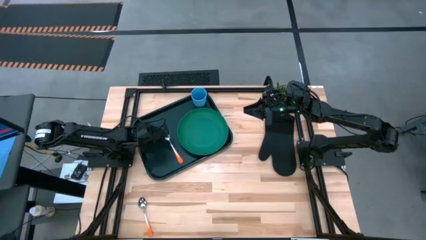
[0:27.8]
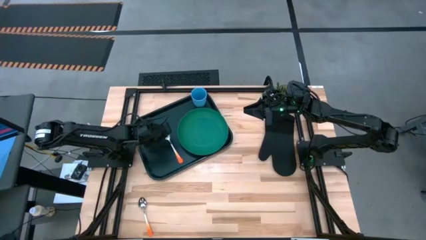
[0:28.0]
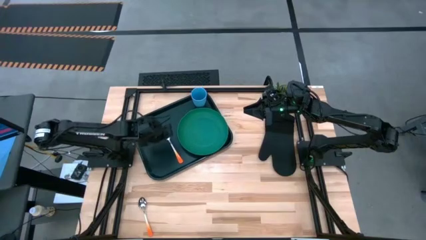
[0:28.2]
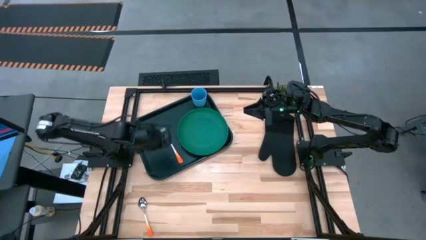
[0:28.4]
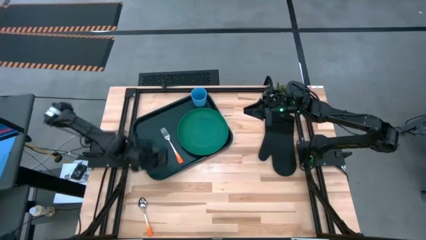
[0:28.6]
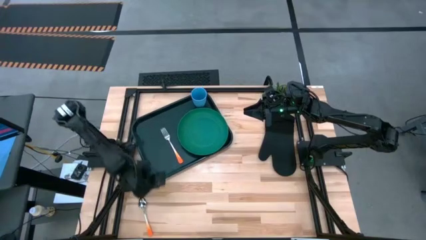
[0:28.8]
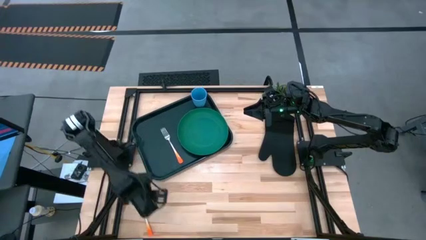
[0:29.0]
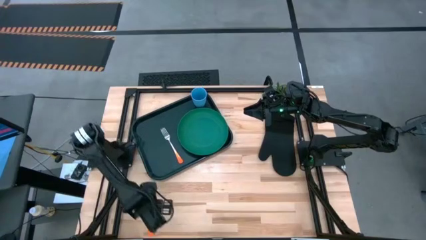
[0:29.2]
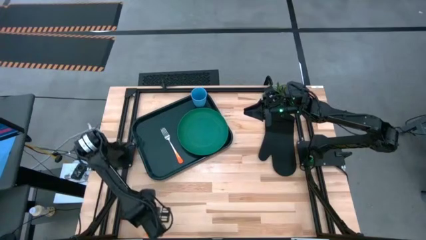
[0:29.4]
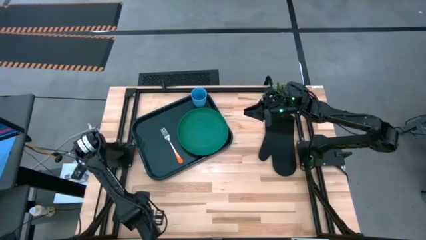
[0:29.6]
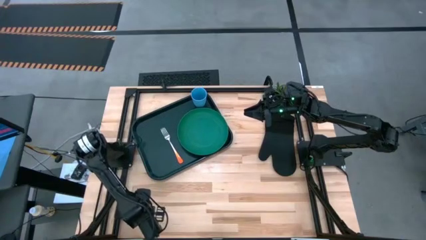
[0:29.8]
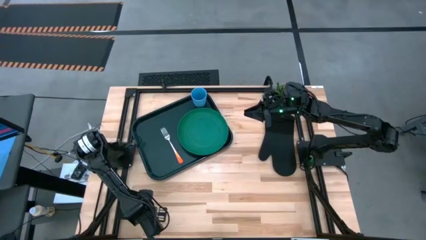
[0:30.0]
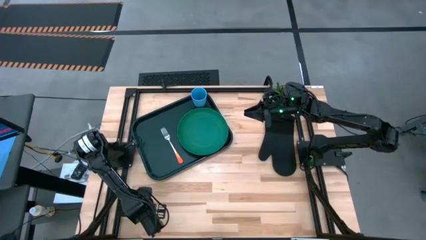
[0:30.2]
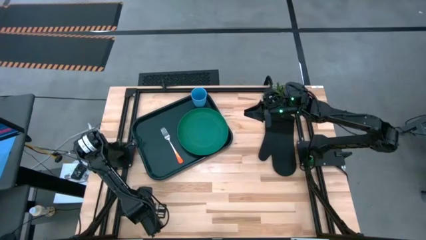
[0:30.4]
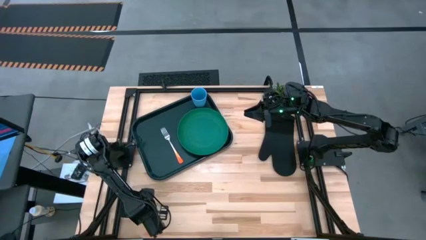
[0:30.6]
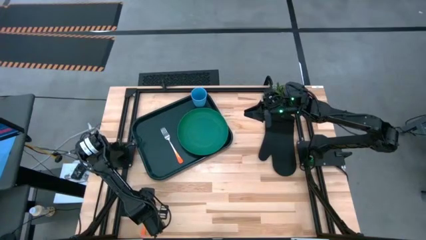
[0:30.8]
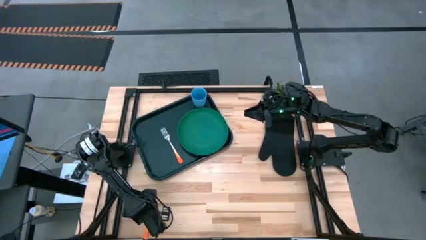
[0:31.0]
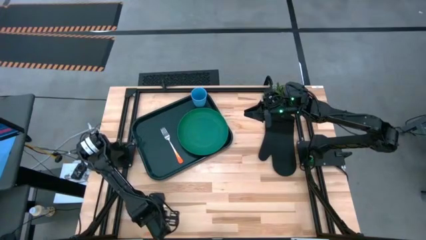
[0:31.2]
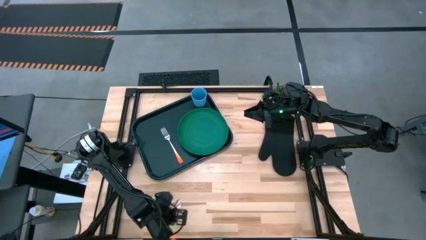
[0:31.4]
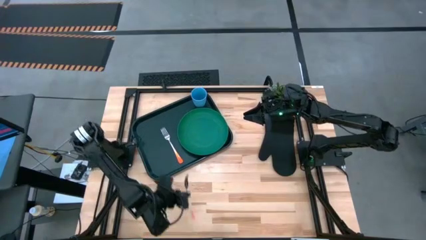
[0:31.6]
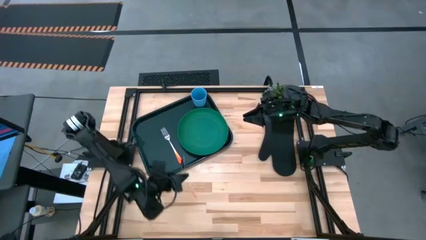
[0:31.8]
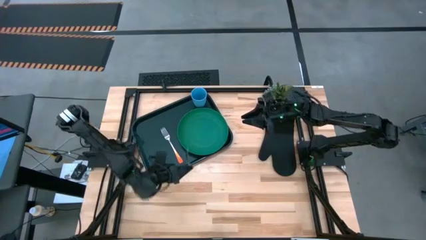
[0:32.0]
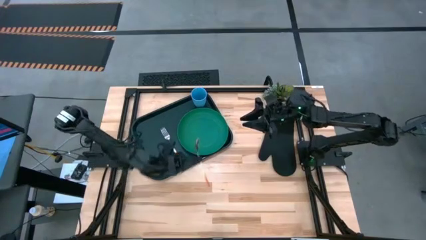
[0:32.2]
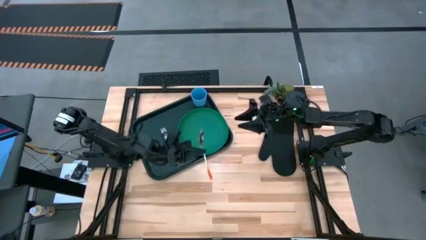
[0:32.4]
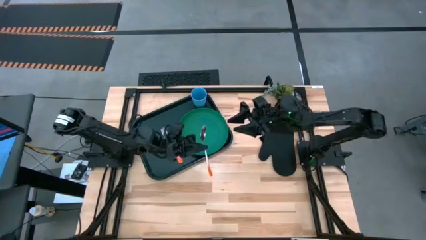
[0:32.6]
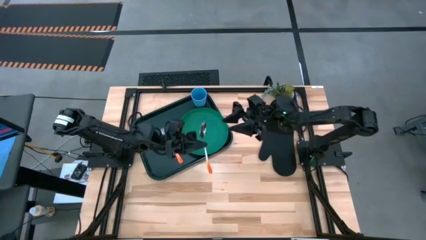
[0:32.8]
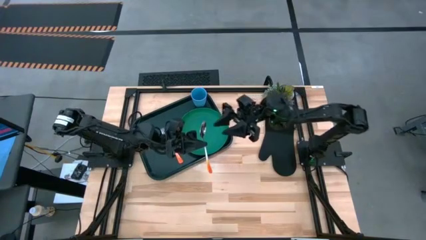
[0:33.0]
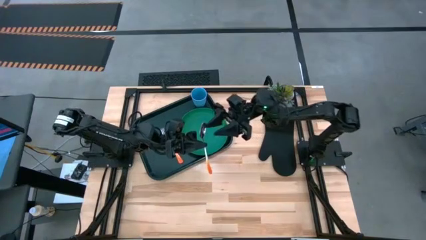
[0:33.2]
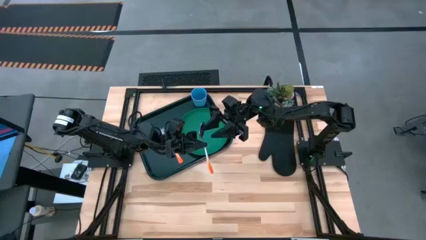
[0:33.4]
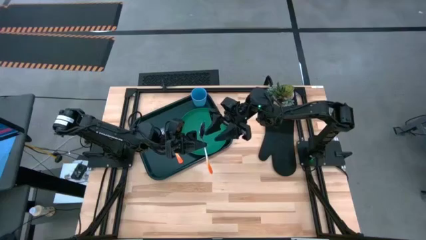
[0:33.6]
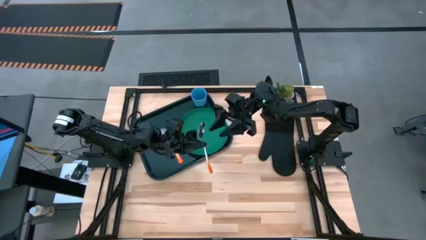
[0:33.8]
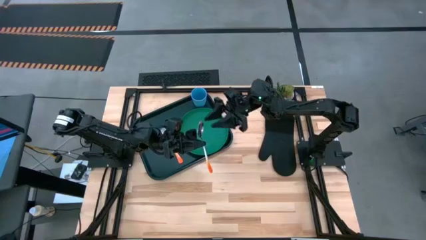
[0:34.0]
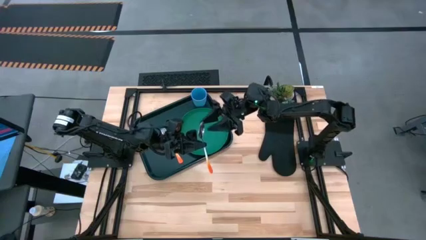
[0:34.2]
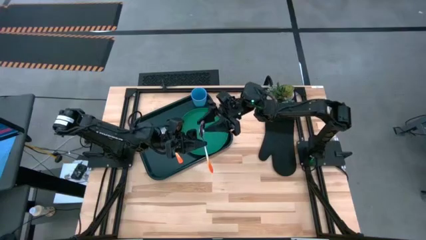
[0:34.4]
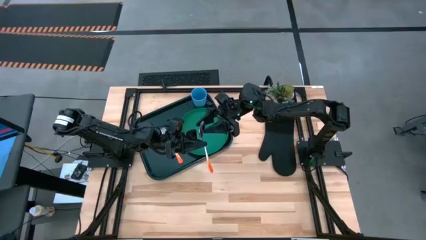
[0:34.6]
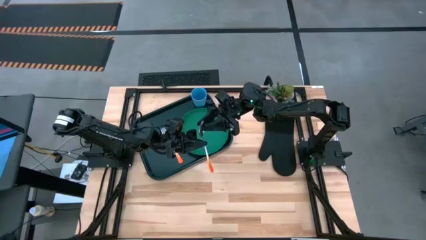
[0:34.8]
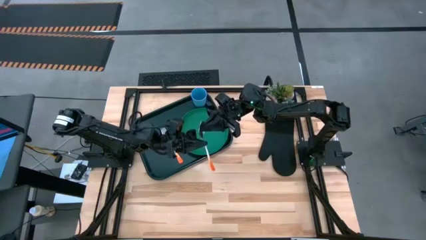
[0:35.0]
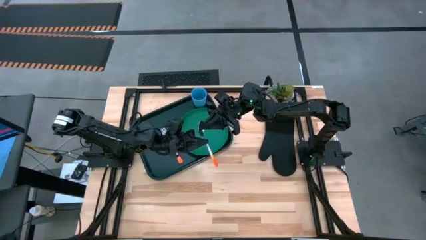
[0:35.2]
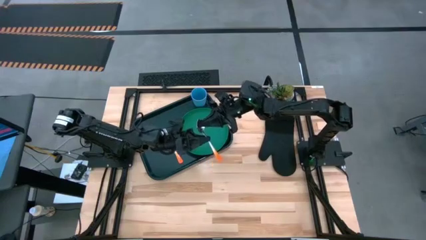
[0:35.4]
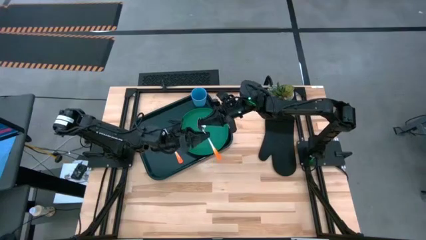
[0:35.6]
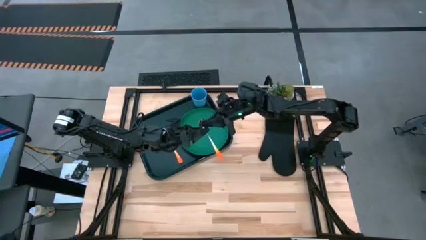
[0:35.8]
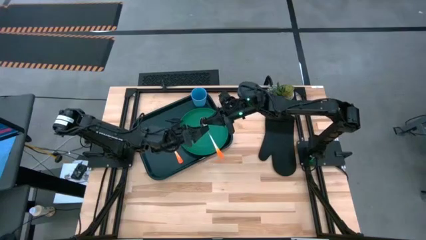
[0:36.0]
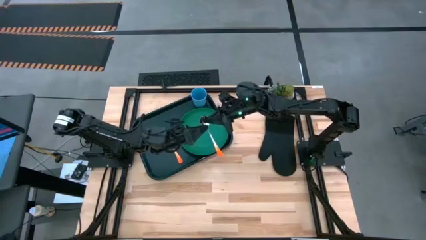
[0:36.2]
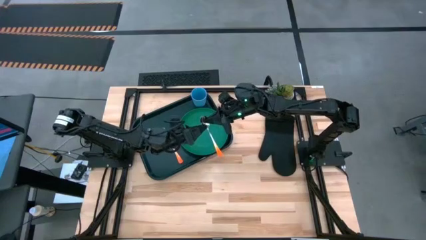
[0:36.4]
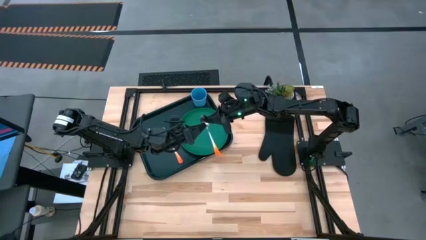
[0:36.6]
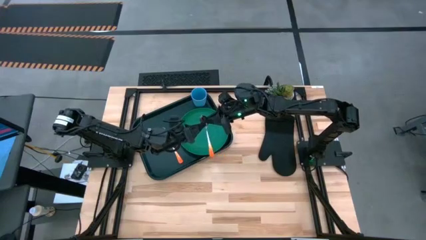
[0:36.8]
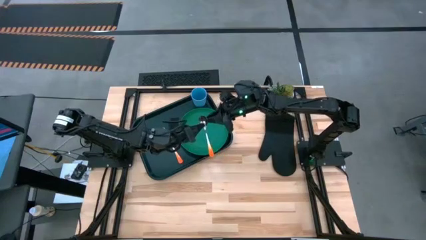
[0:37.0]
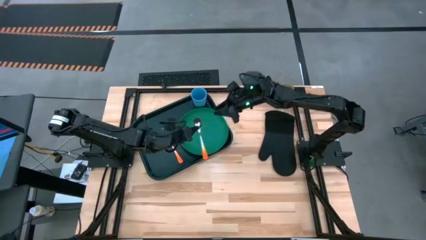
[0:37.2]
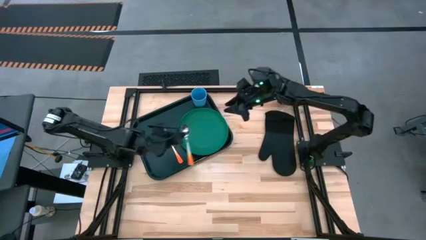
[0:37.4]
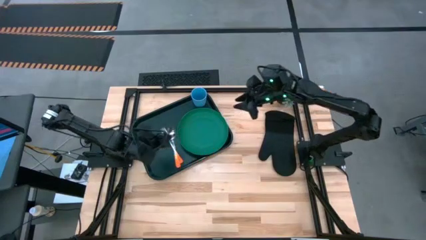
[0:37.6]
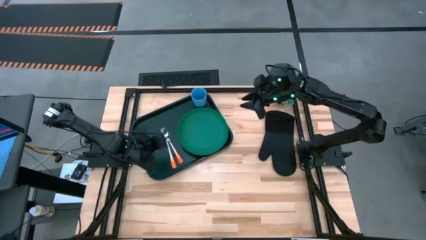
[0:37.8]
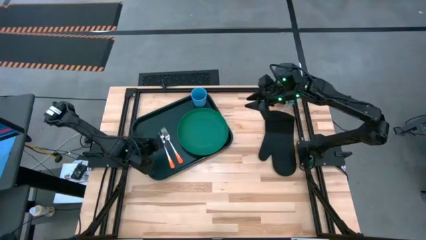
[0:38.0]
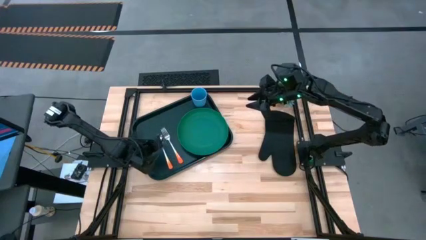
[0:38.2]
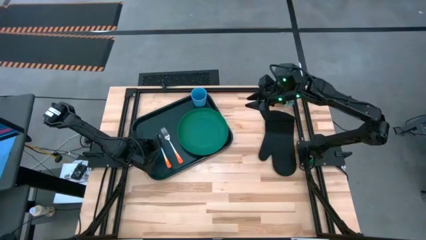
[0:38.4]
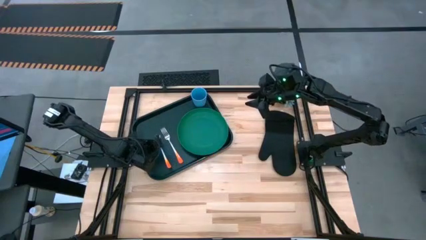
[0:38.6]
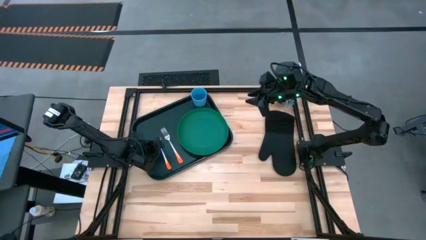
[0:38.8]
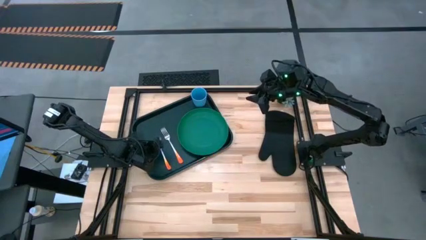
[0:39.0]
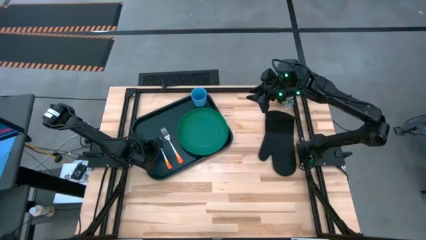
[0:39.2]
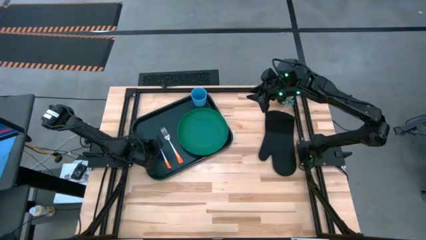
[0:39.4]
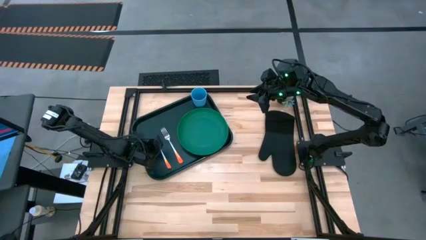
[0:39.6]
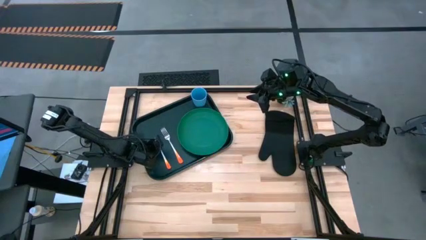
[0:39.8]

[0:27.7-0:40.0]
Task: Pick and place plate/cup/fork/spoon on tray
Put the orange spoon on the black serving tray to the left of the orange fork

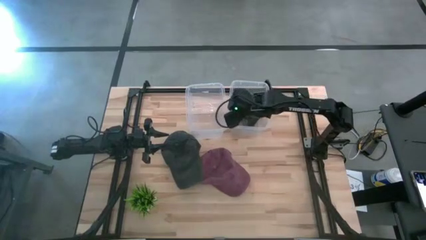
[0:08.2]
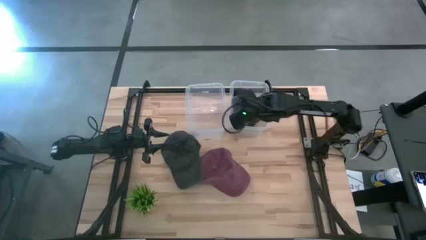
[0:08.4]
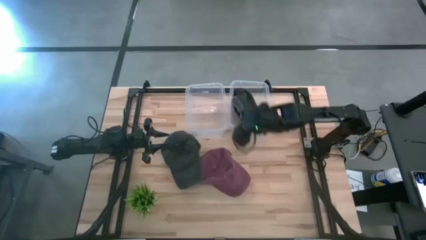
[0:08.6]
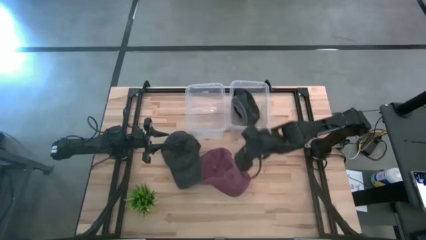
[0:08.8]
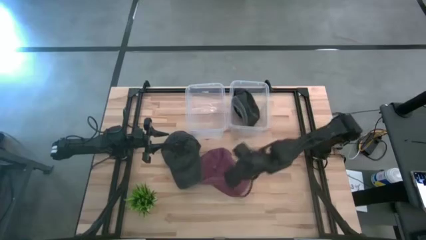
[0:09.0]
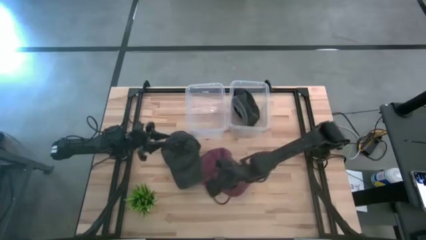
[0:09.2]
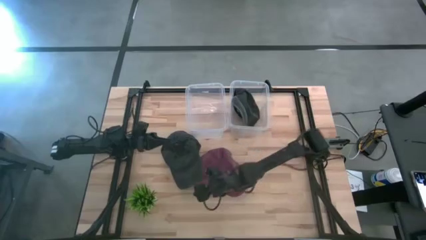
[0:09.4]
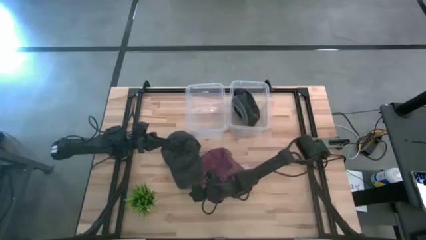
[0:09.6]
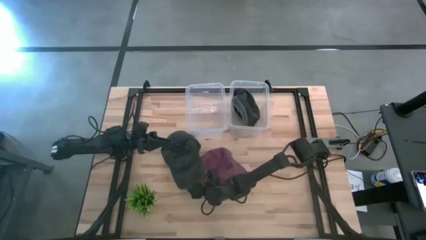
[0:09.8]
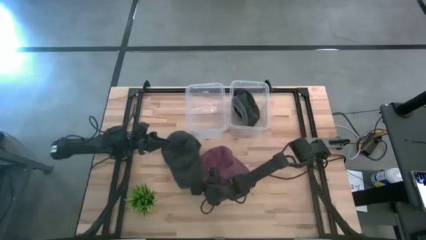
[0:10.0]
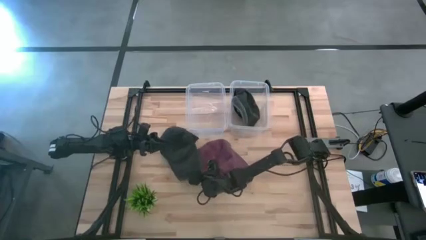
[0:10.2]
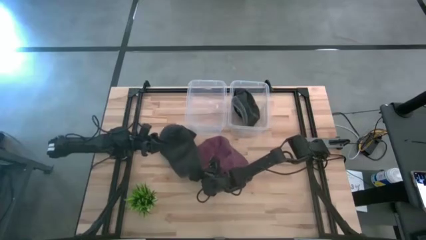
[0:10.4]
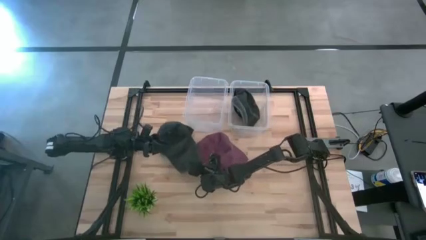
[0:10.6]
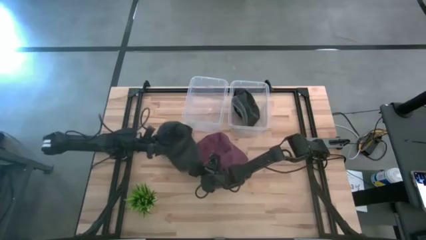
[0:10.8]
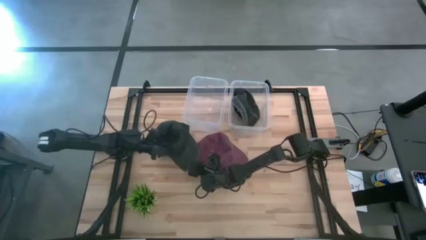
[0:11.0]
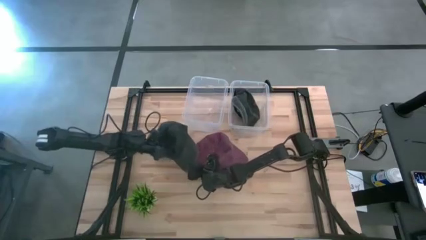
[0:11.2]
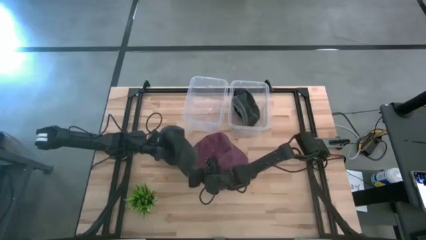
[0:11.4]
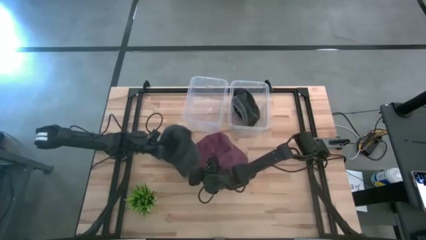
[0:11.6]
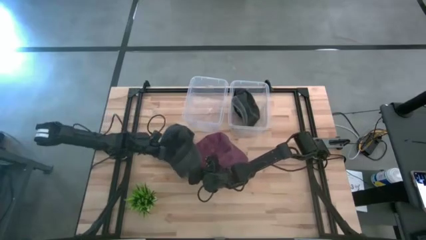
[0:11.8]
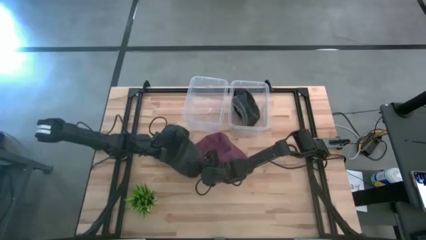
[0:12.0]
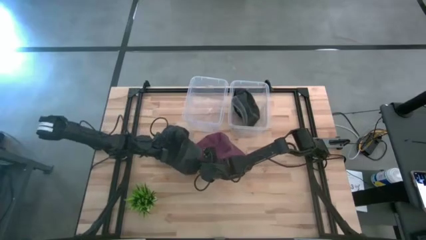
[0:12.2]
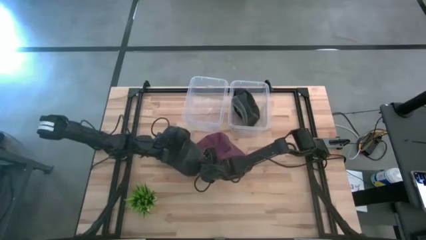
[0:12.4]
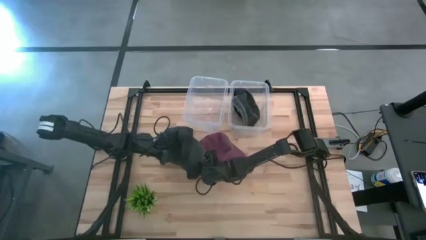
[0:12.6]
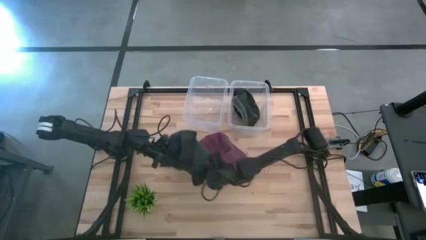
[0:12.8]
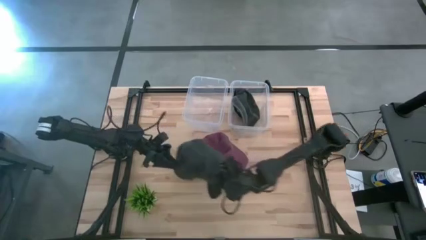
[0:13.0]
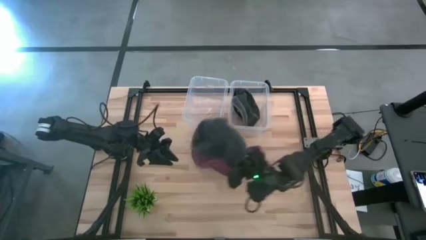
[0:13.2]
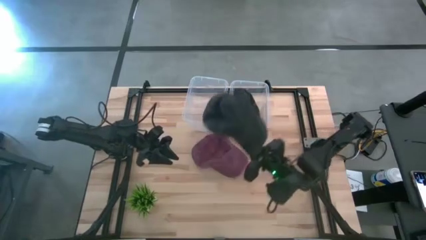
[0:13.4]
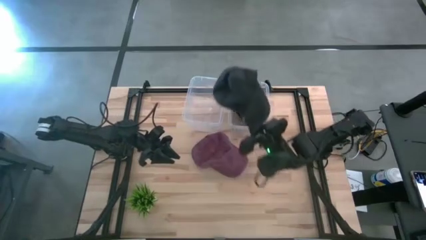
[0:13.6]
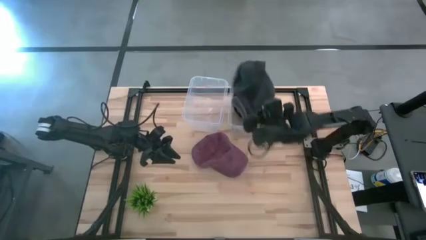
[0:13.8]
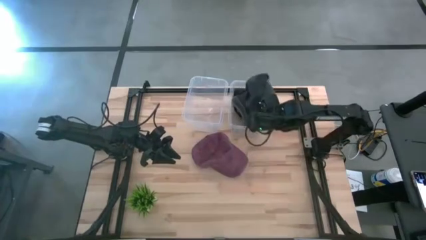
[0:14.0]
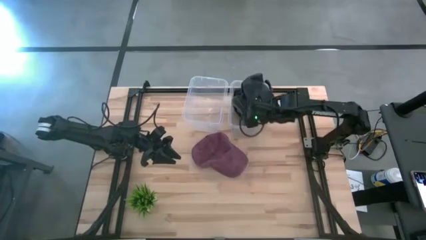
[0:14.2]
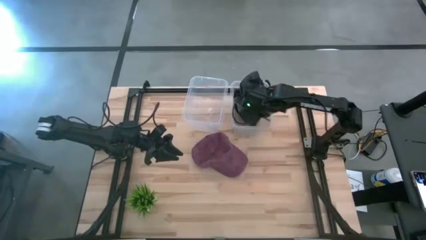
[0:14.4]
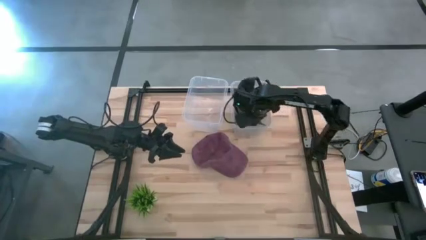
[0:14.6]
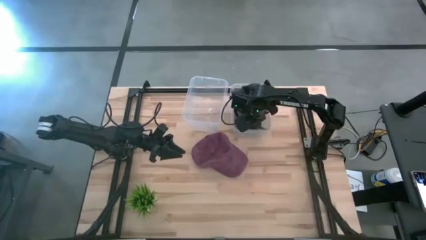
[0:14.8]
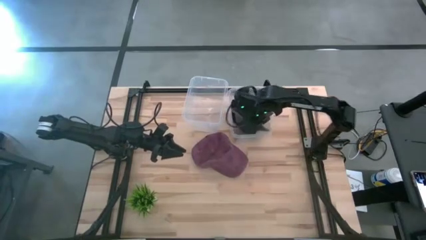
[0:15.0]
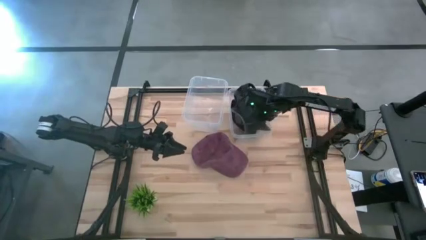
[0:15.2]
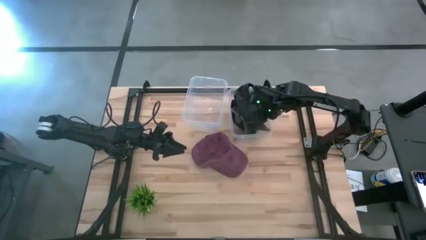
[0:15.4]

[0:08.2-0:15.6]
Task: Pick & Place hat
Put the black cap into the right transparent bin
